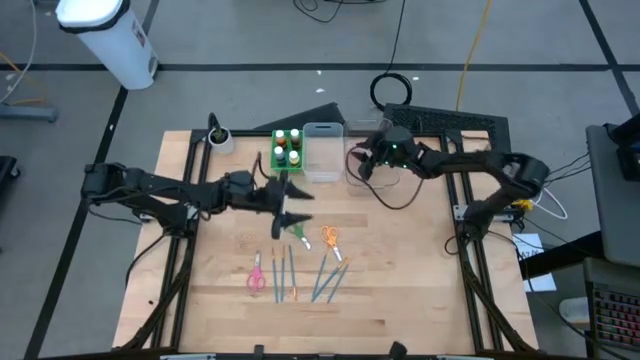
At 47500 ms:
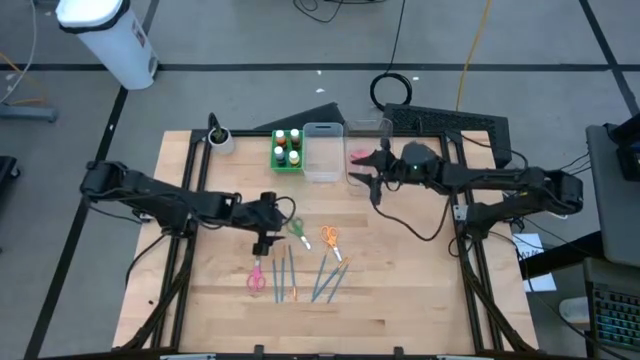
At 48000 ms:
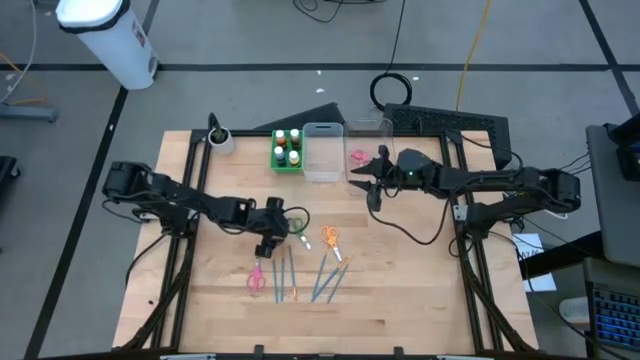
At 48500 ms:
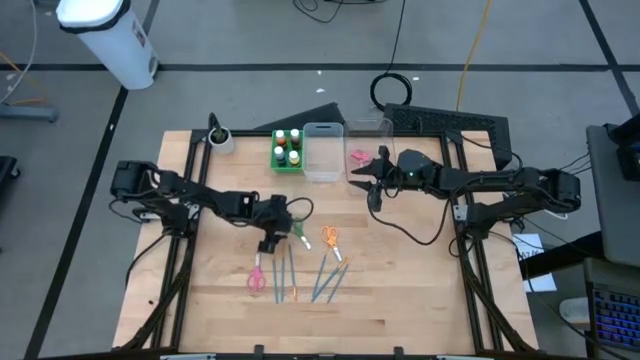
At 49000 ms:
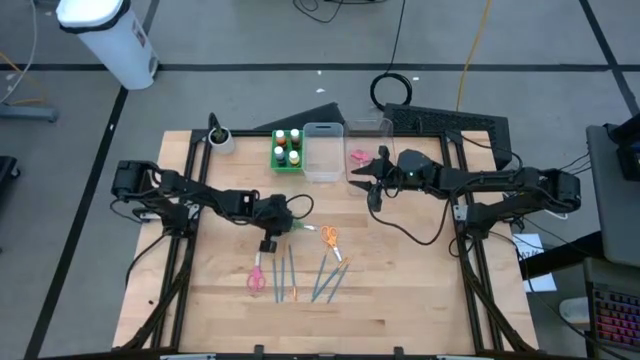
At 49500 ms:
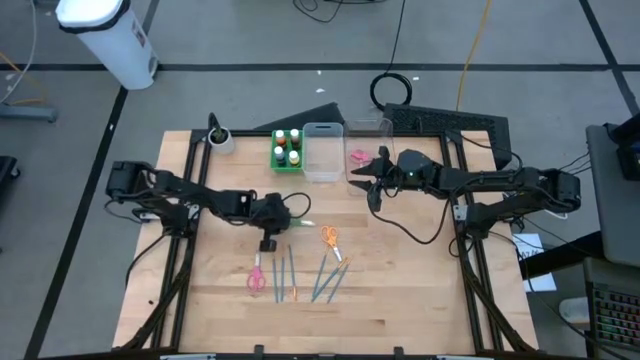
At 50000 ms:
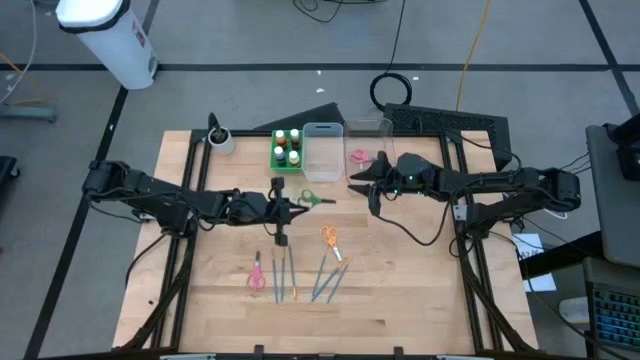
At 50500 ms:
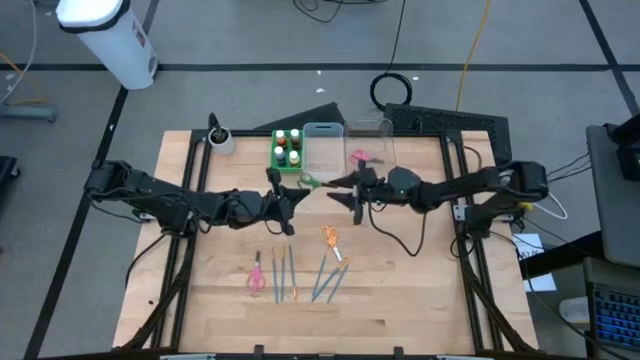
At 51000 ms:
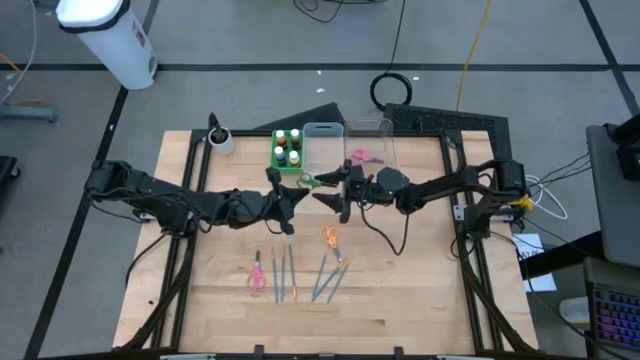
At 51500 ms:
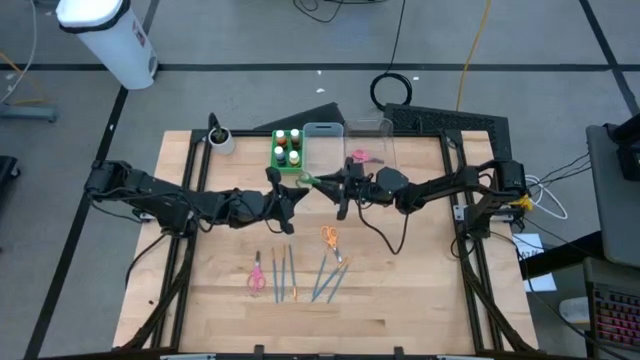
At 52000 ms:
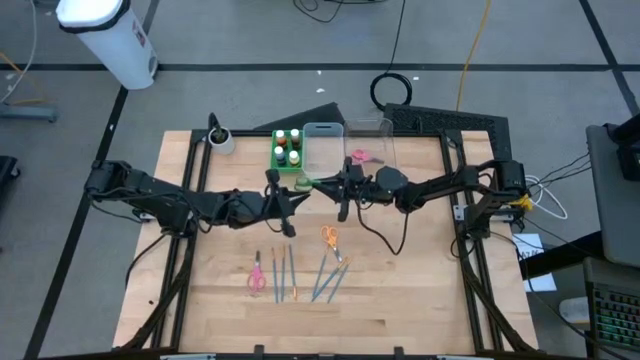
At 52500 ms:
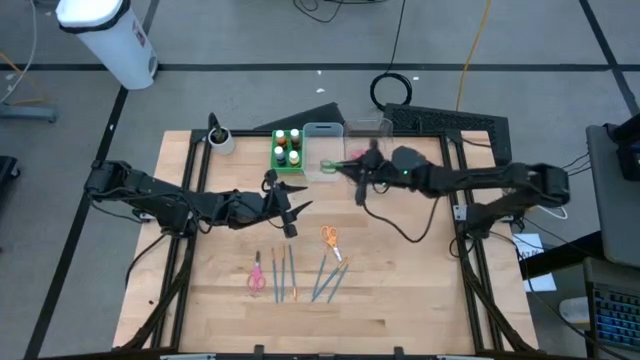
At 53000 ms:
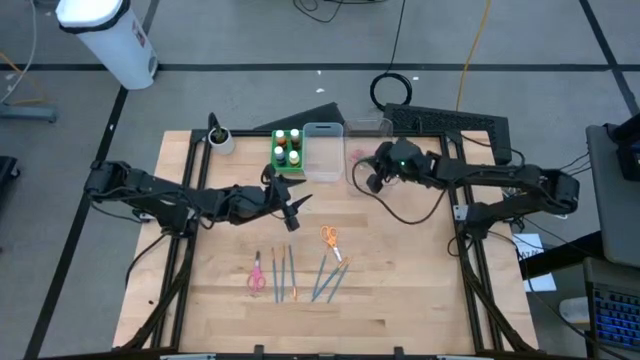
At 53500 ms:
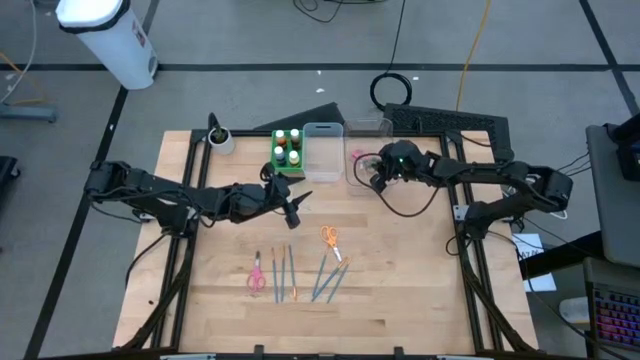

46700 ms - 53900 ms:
Task: Pick & Place Paint Supplies
Put the green scissors into the transparent bin

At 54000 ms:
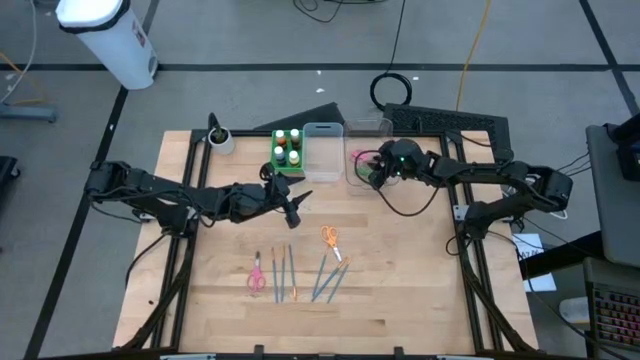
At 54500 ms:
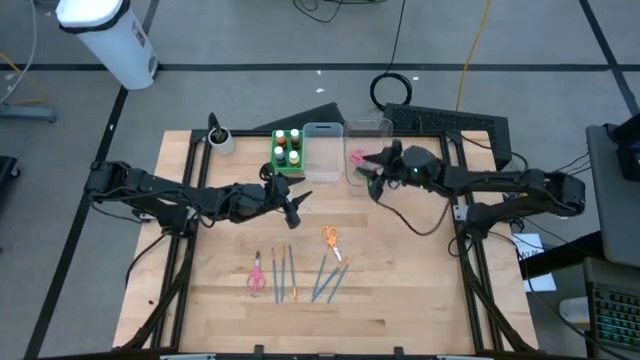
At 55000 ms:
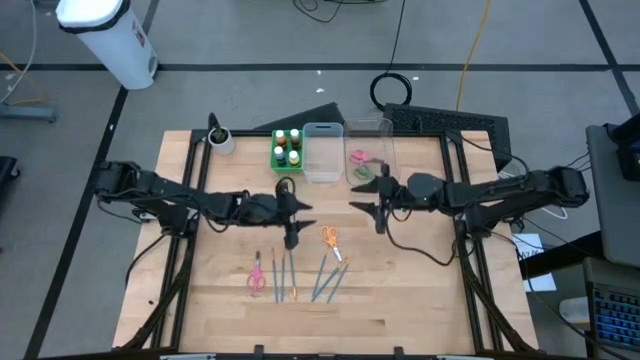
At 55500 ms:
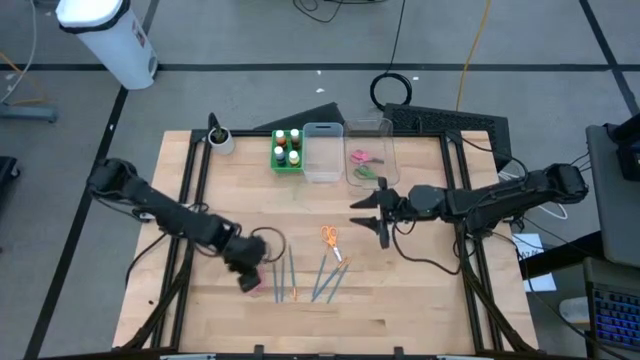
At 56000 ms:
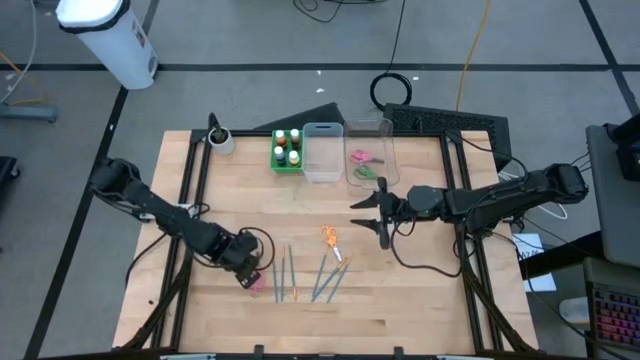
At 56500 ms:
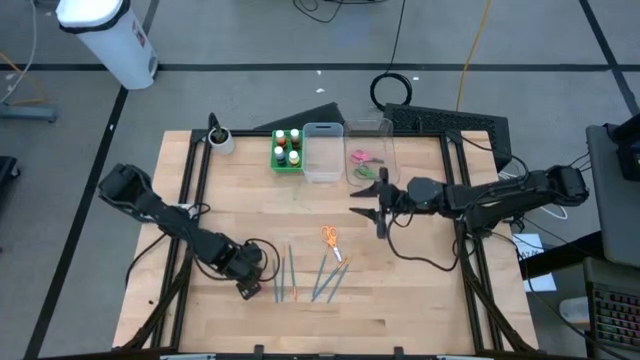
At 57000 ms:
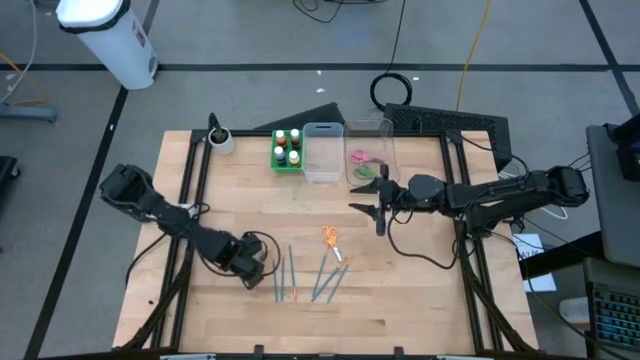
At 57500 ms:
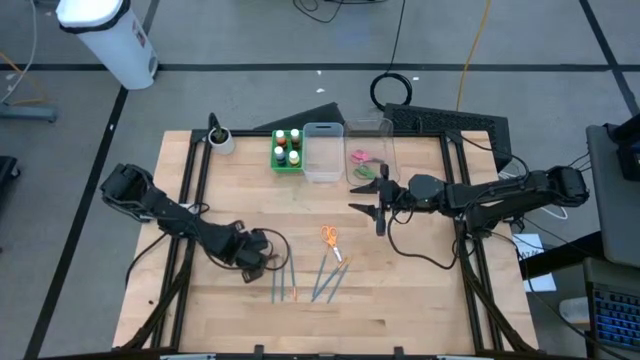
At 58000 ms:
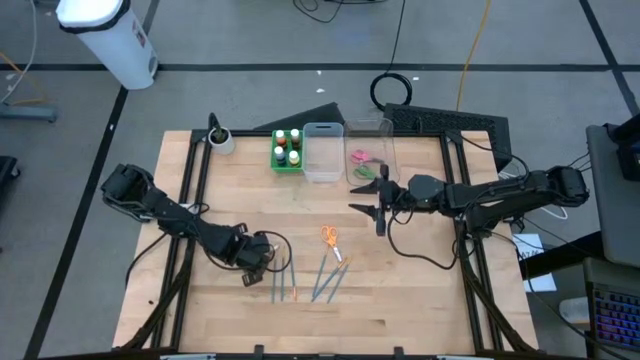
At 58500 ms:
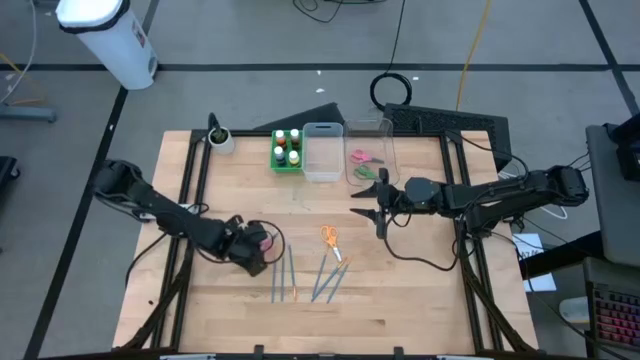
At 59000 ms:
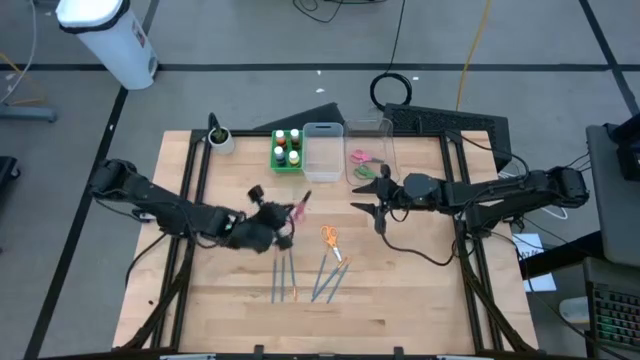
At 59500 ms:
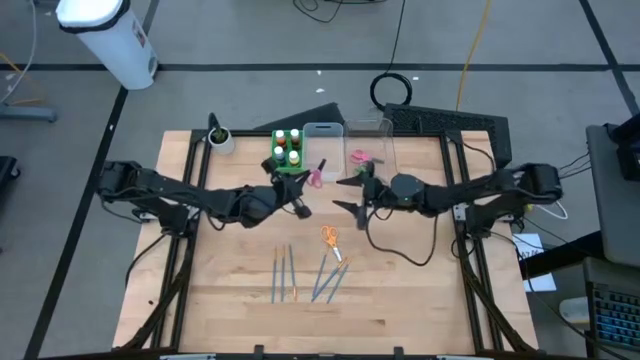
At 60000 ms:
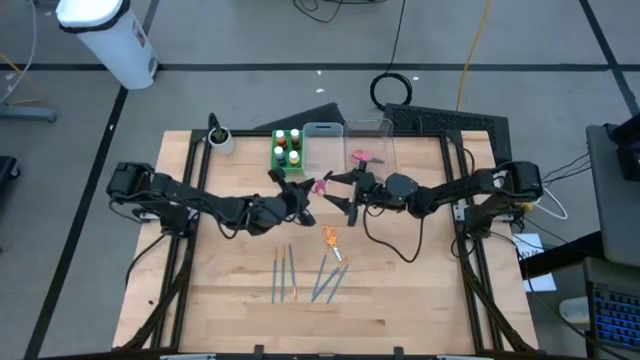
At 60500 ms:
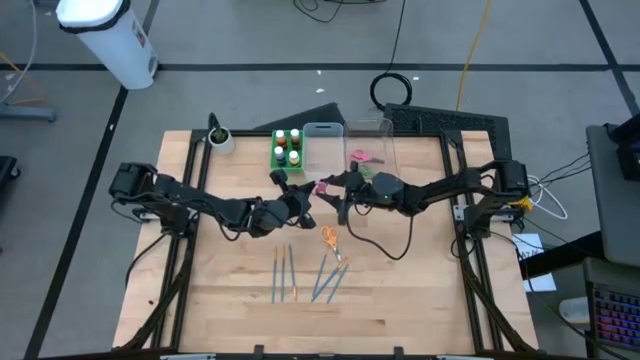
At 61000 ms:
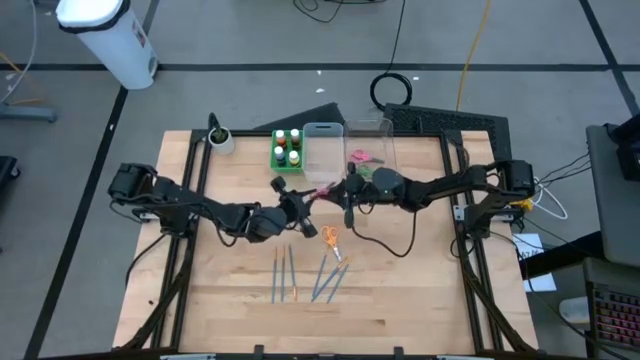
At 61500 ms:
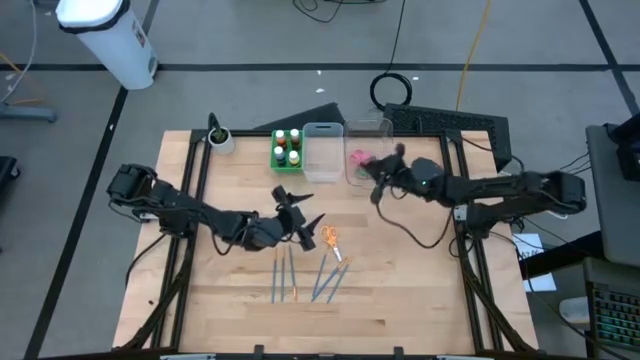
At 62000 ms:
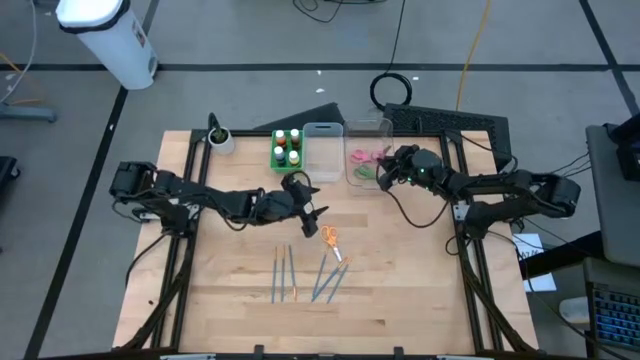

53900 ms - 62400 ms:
Put the pink scissors into the transparent bin

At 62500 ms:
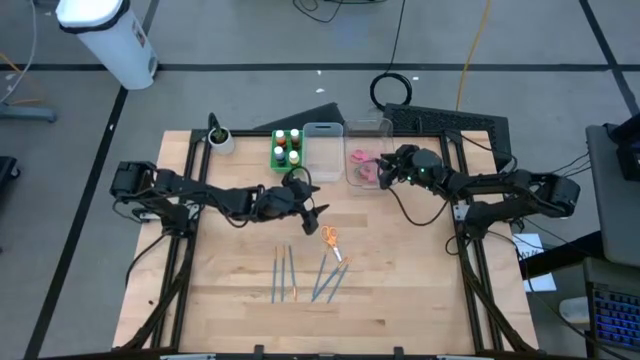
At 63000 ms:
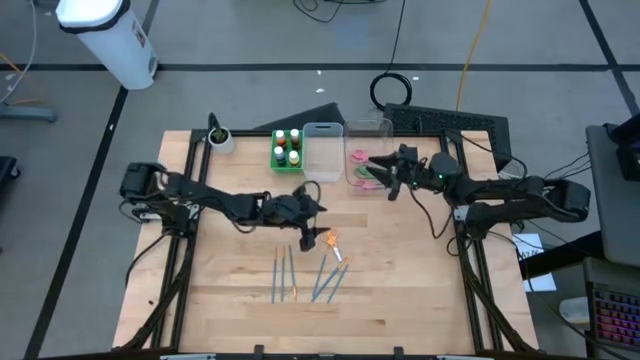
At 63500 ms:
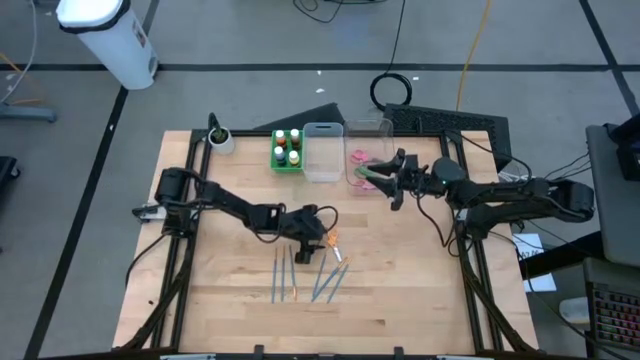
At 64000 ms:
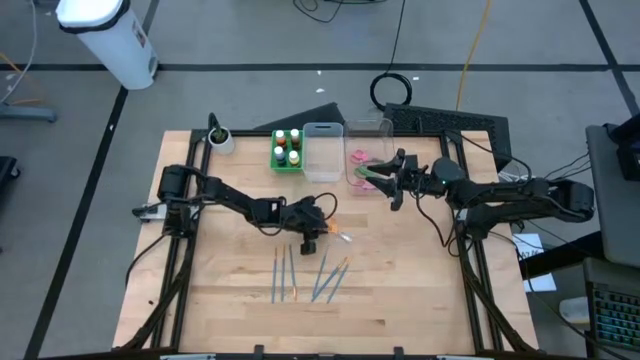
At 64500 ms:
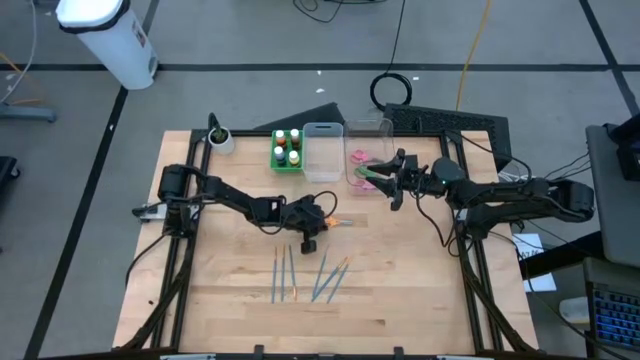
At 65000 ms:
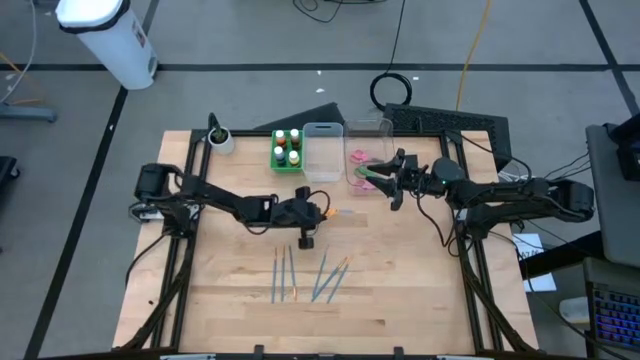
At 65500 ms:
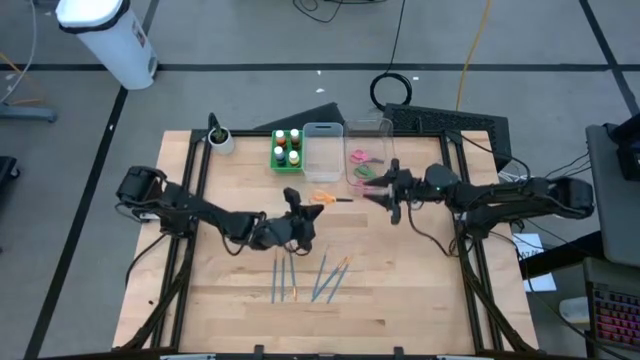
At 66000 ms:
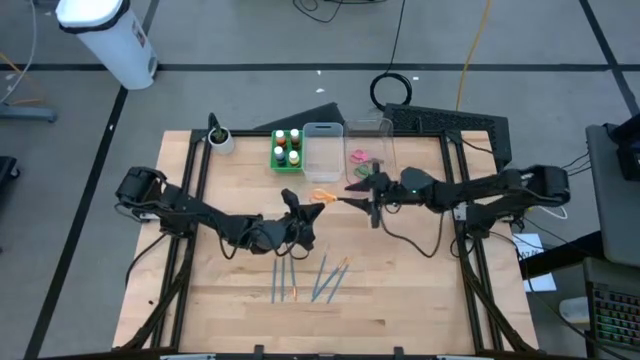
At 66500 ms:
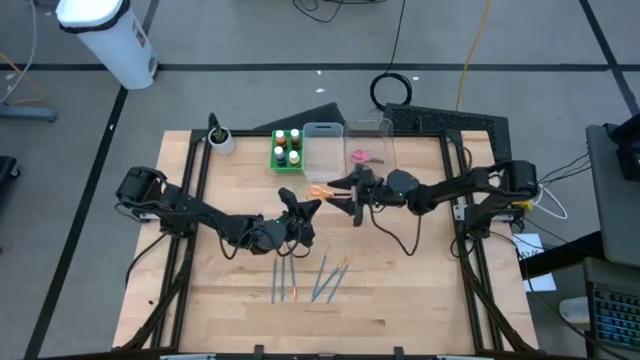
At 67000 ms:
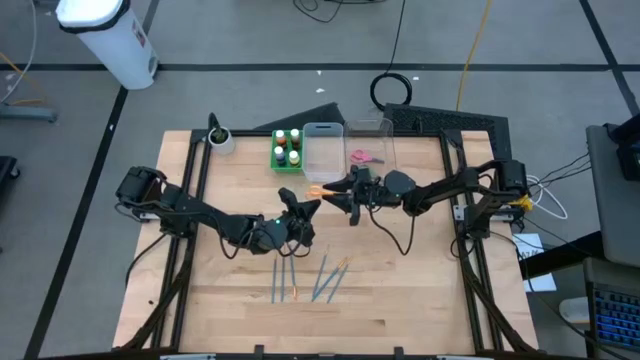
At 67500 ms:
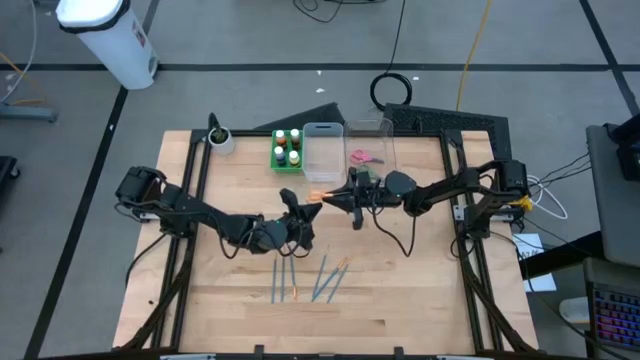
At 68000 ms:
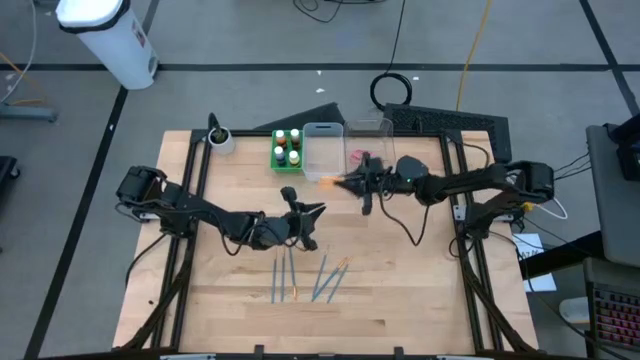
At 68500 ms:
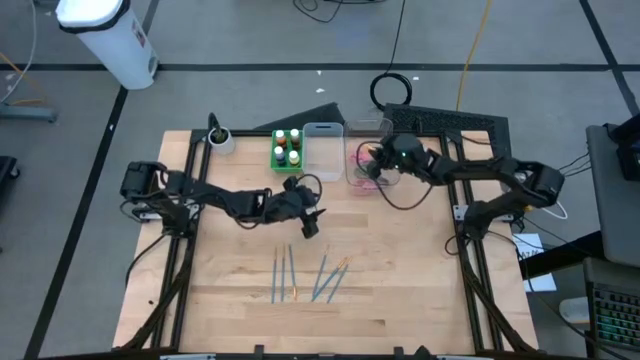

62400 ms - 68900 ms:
Put the yellow scissors into the transparent bin
